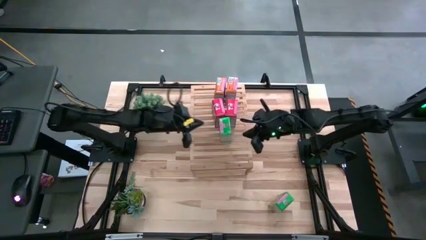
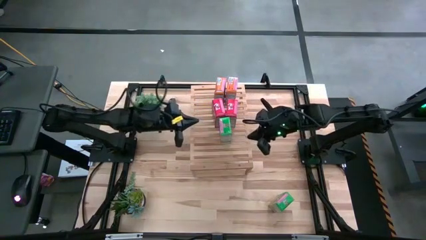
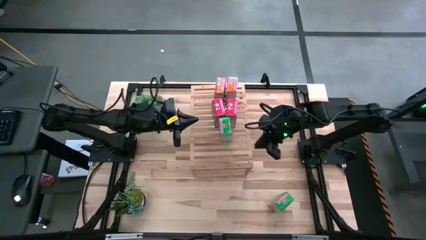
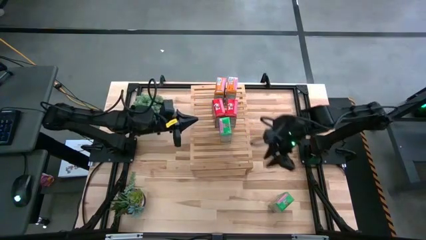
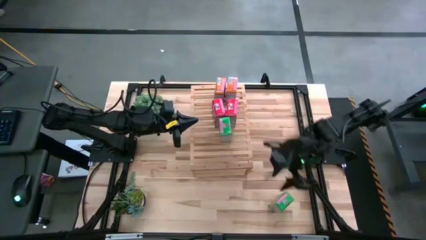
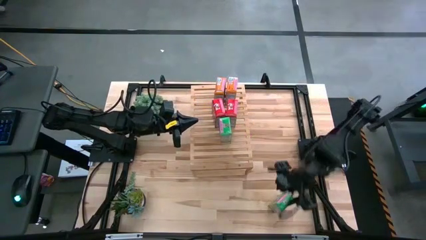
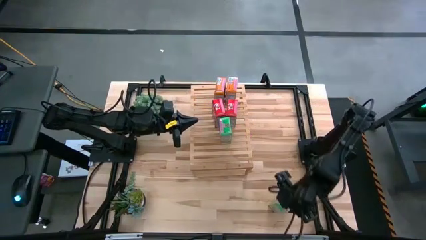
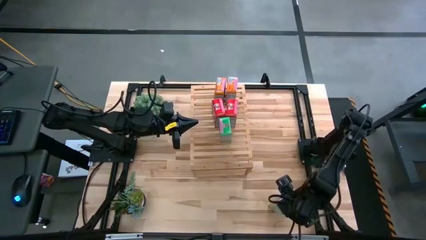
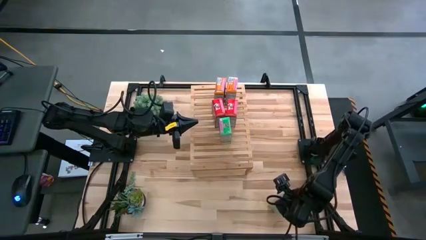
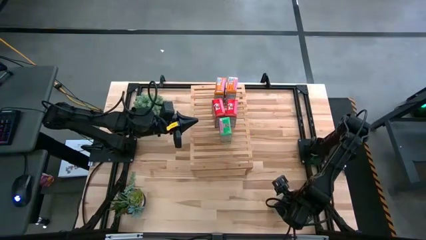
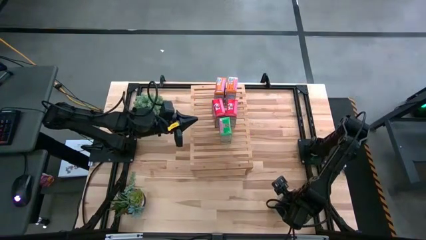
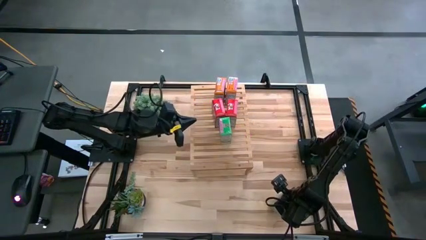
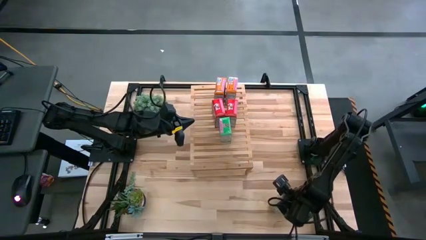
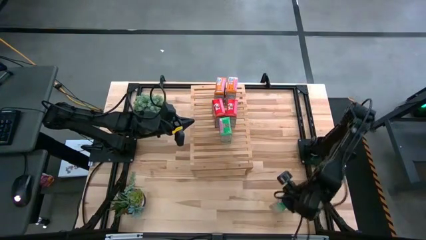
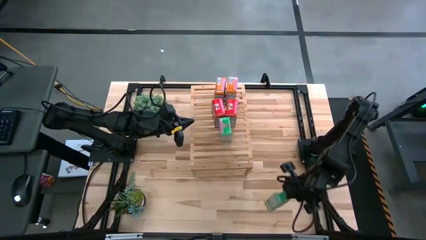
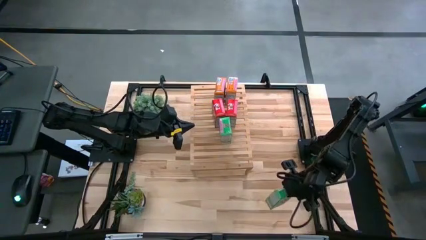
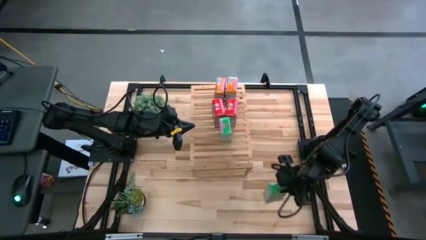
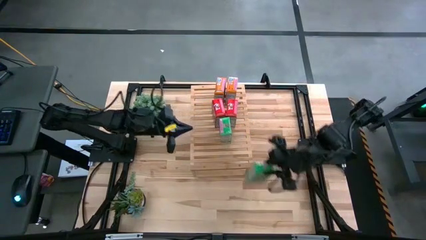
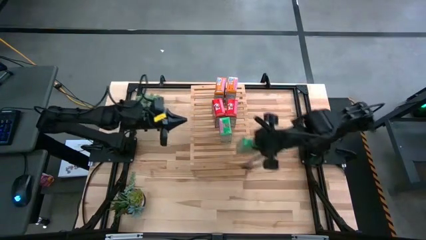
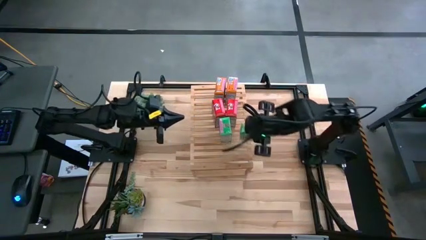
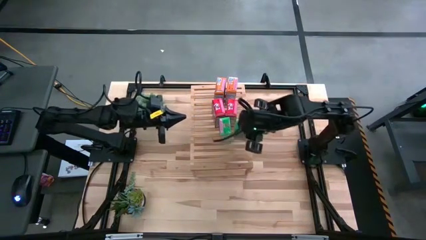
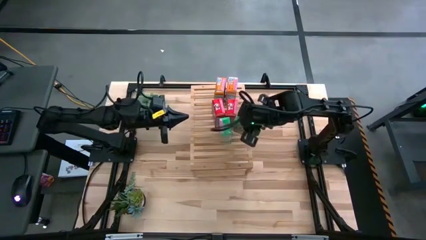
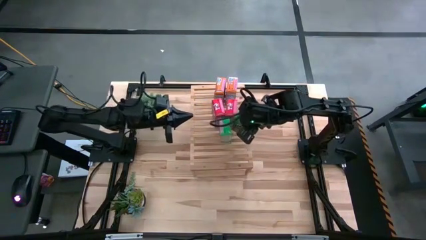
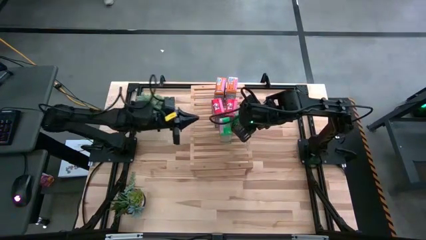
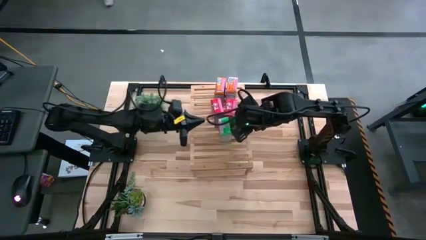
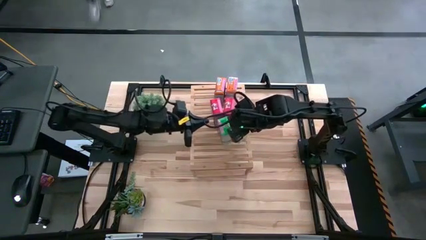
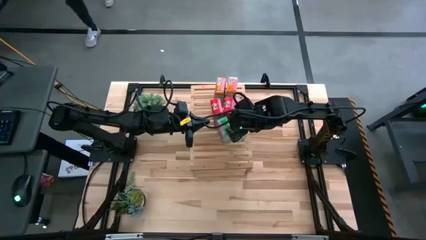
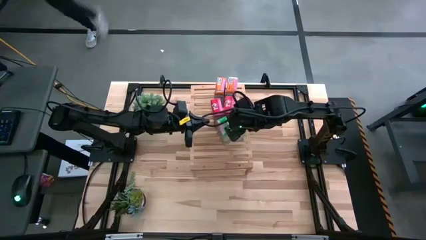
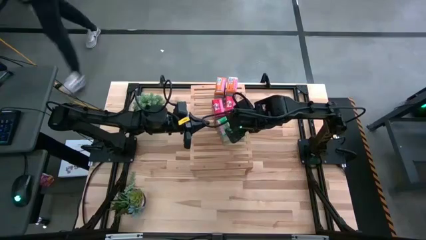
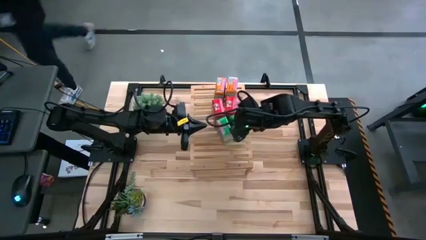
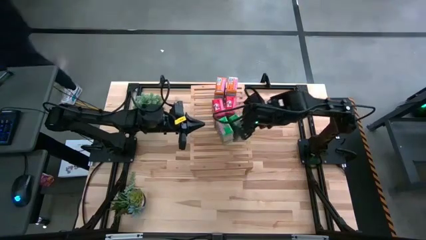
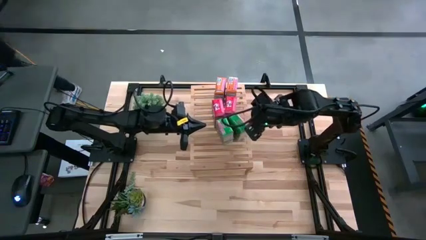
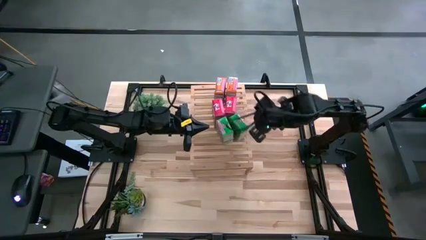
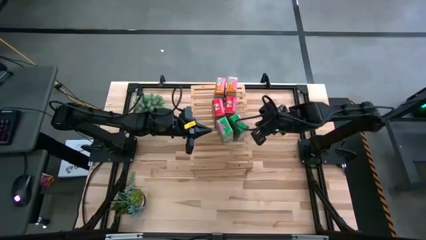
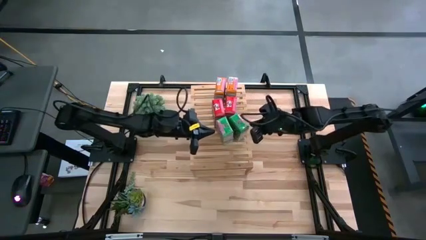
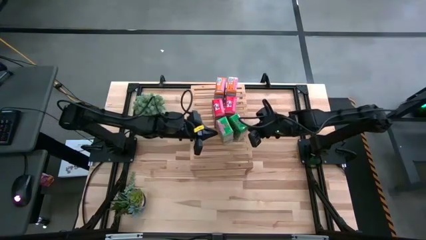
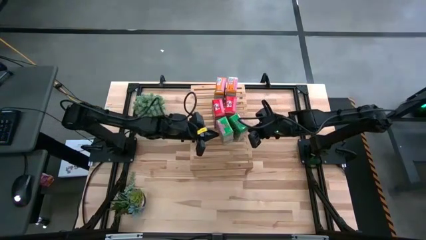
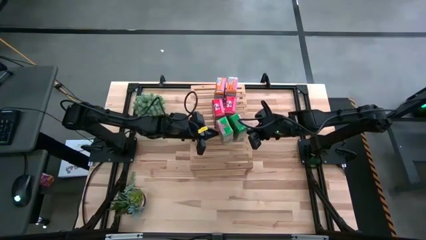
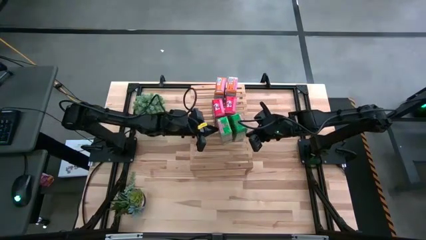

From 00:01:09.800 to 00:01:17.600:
Task: Stack cereal on shelf
Put the green cereal box aligned with the other green cereal box on the shelf

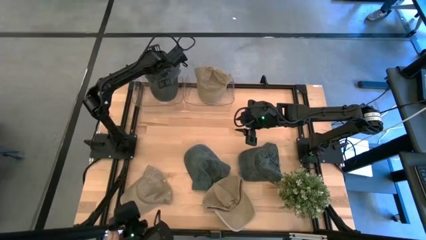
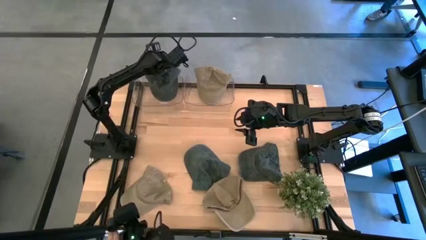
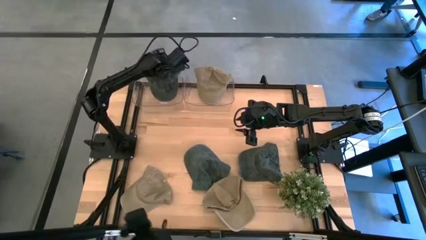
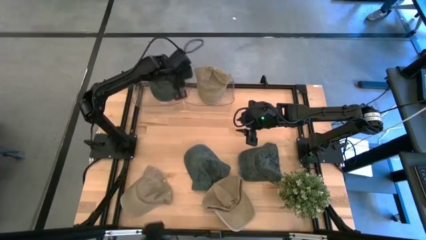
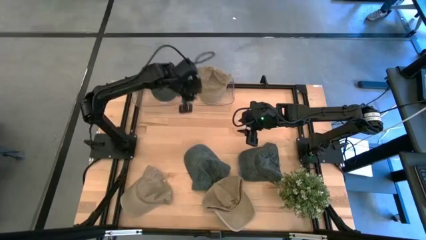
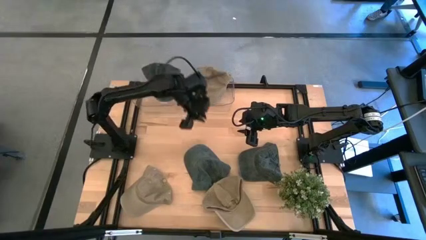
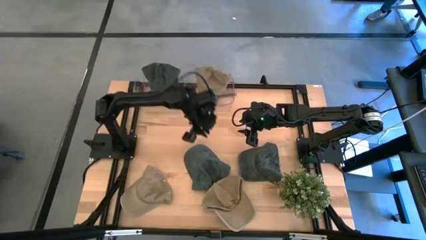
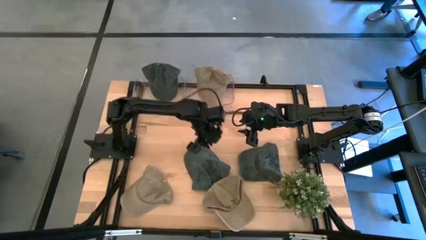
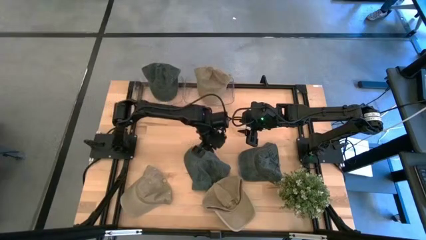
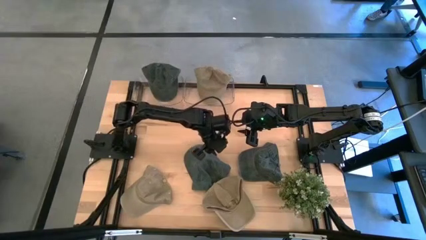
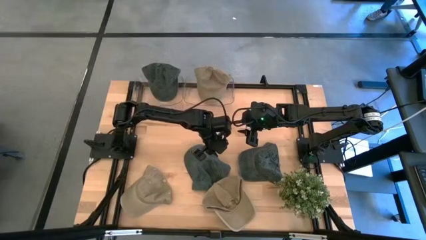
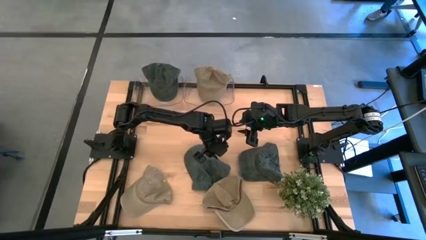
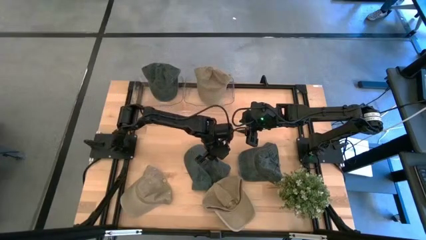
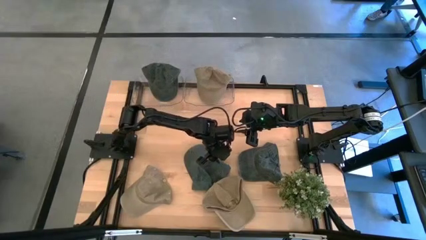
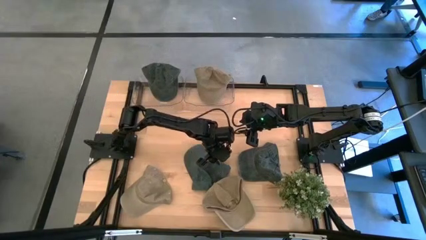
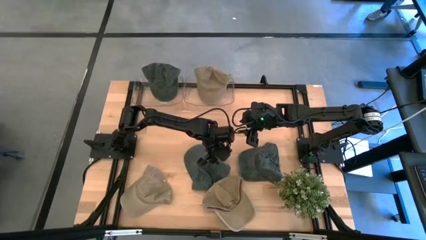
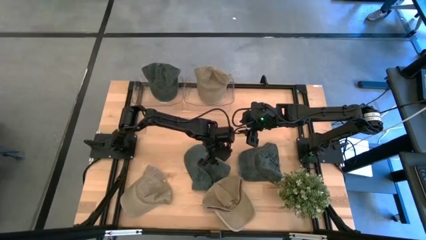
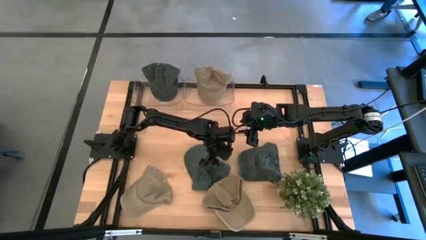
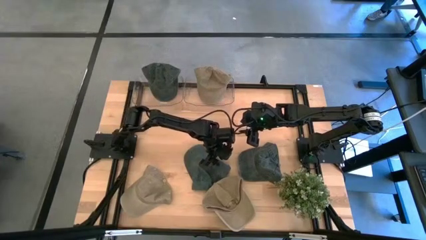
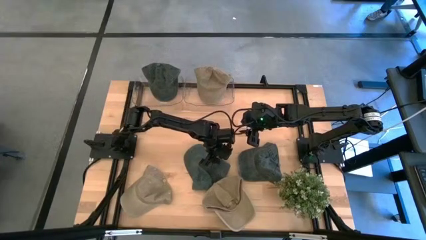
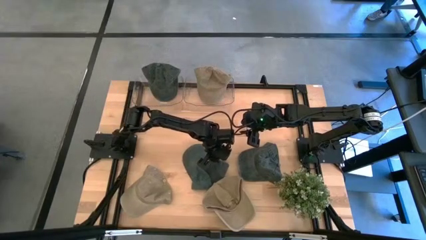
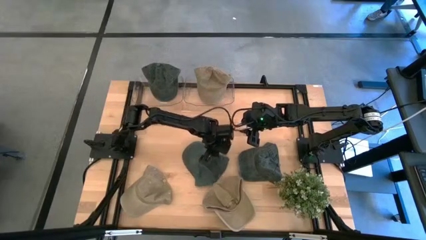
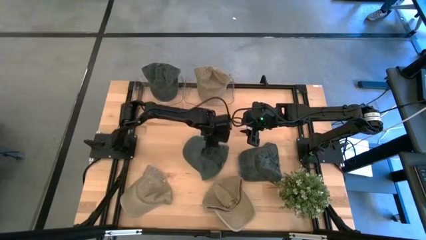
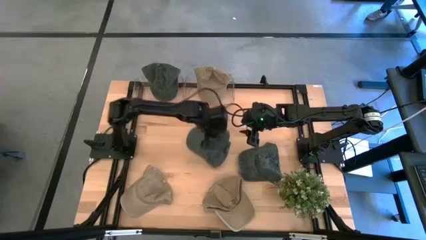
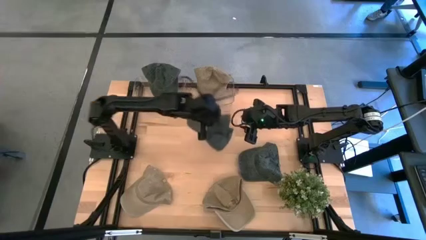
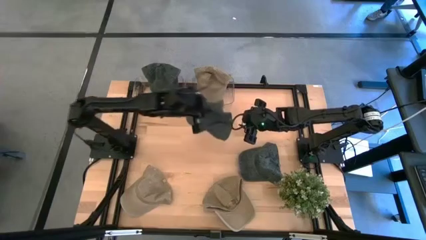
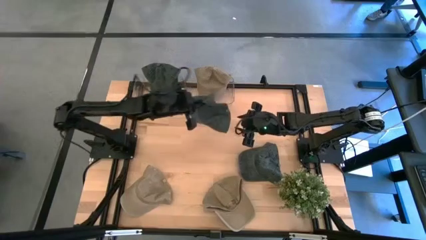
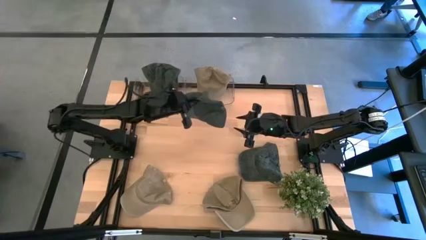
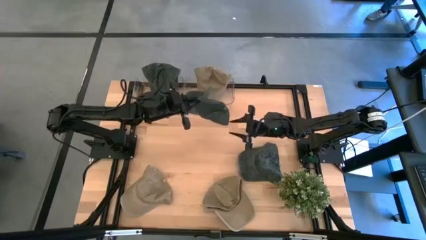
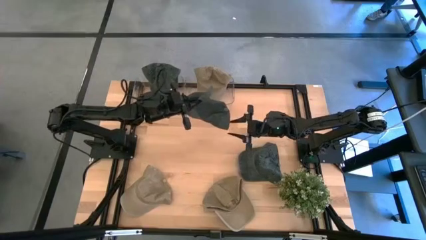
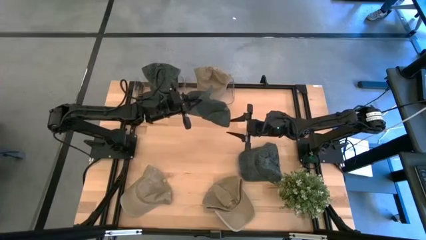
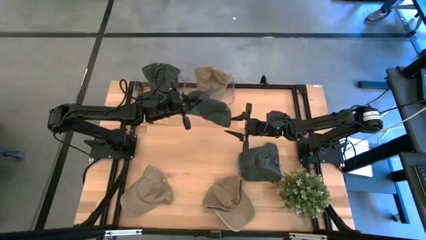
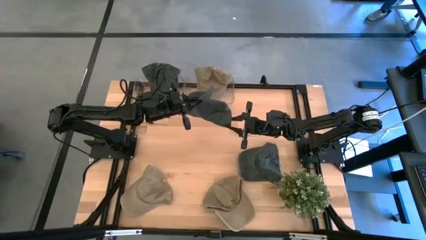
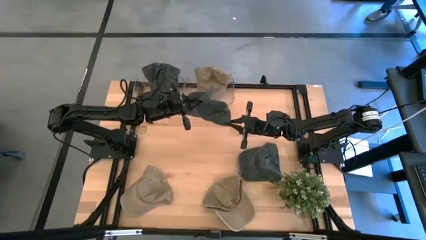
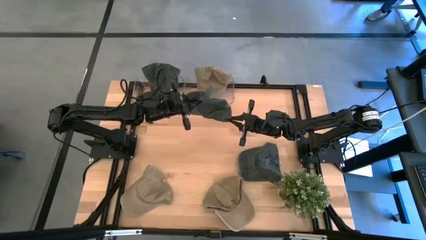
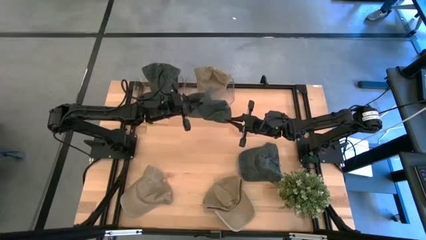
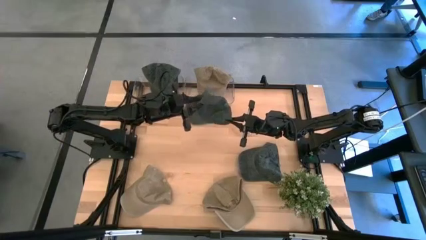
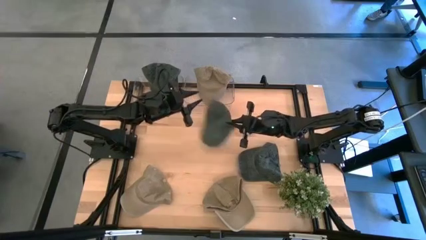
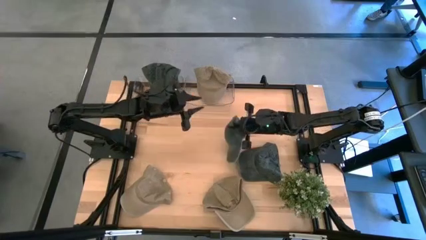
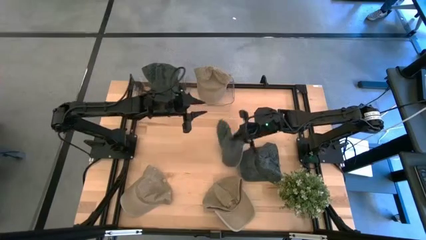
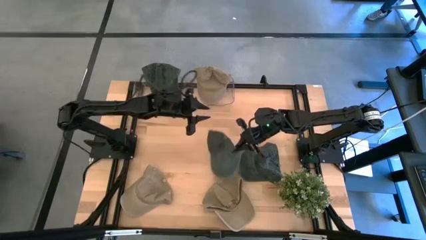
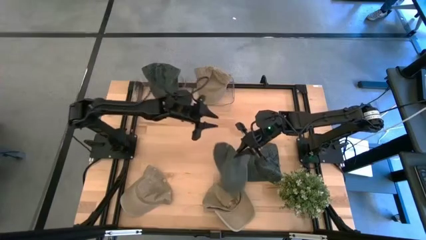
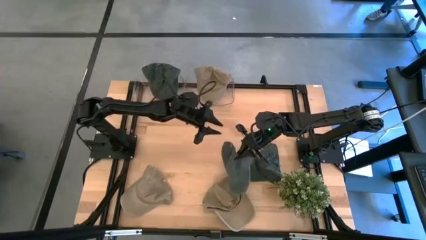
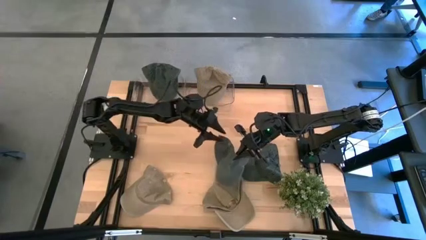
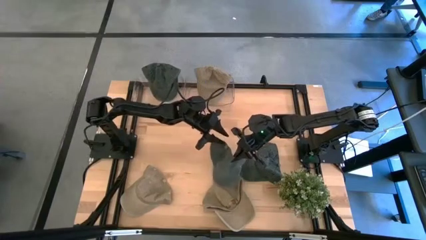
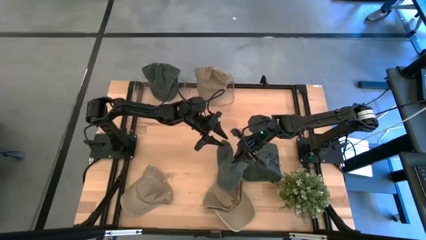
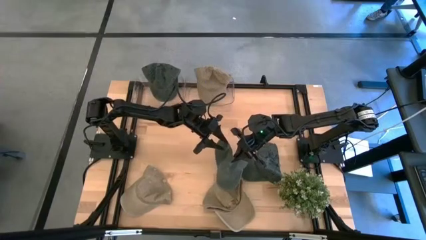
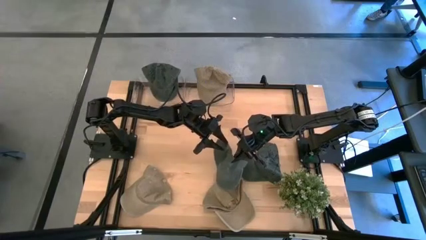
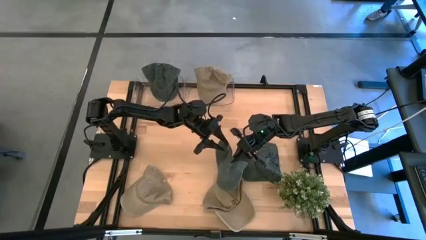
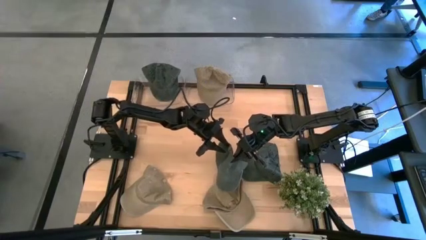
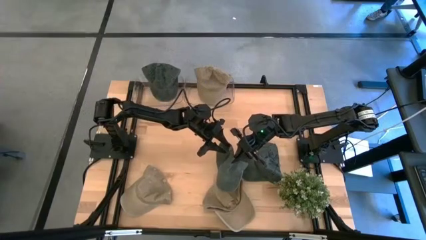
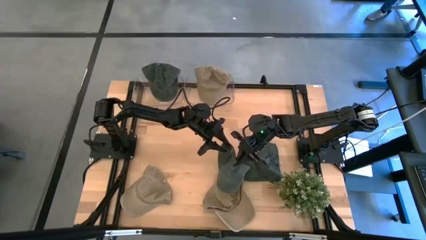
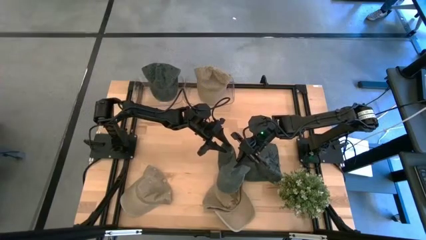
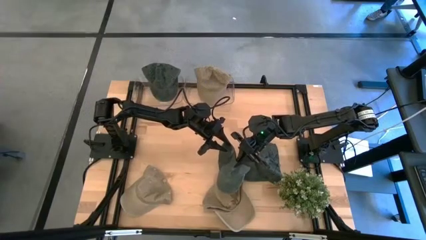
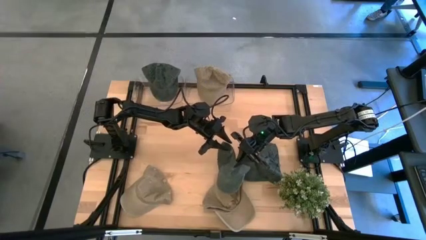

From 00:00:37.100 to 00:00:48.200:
Task: Pick & Place hat
Put the left blue cap into the left transparent bin
